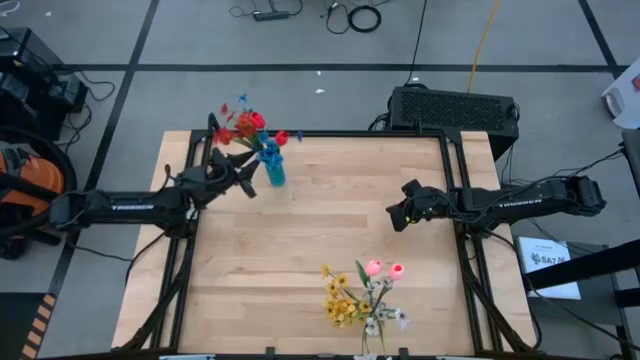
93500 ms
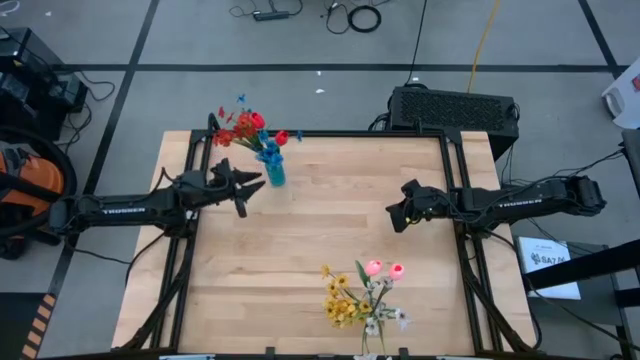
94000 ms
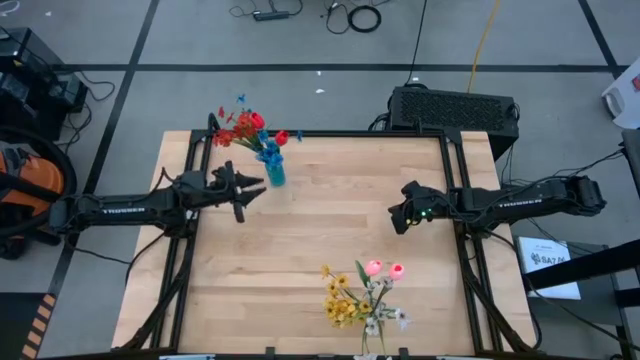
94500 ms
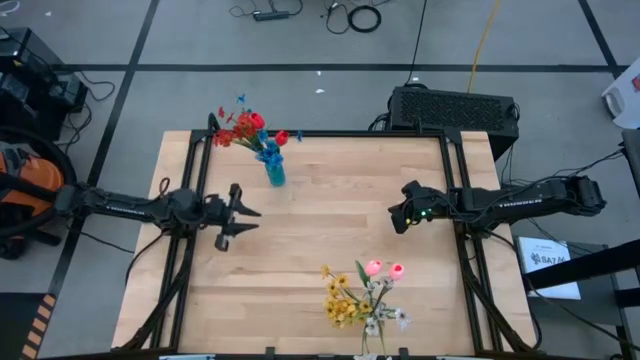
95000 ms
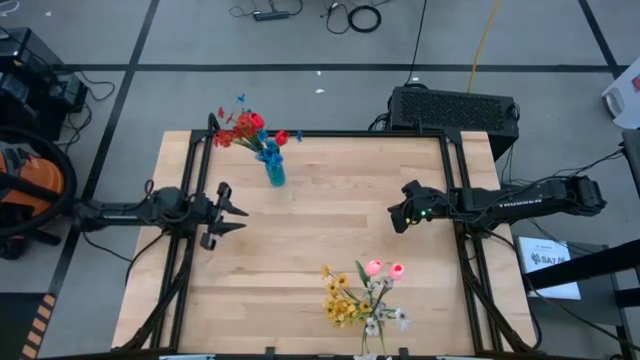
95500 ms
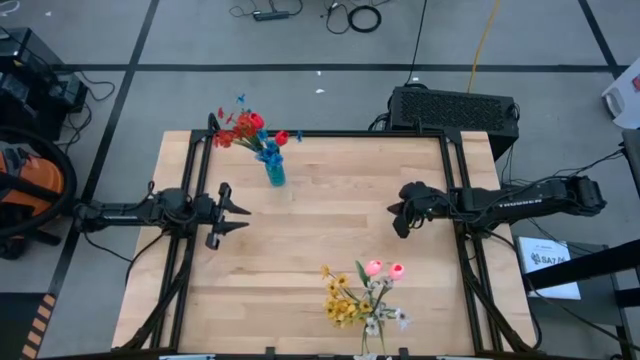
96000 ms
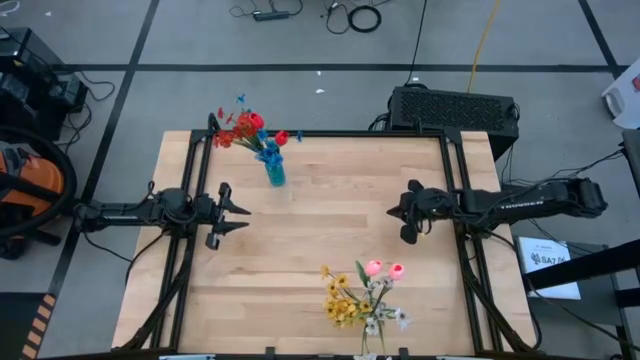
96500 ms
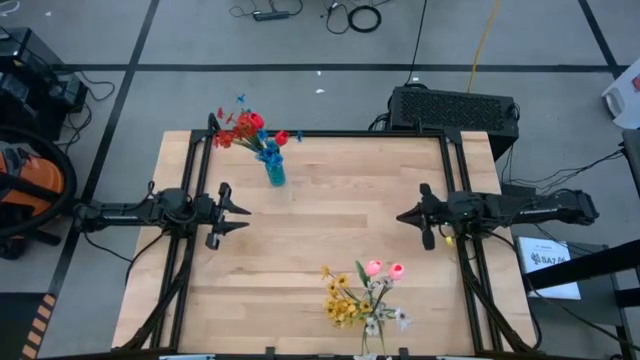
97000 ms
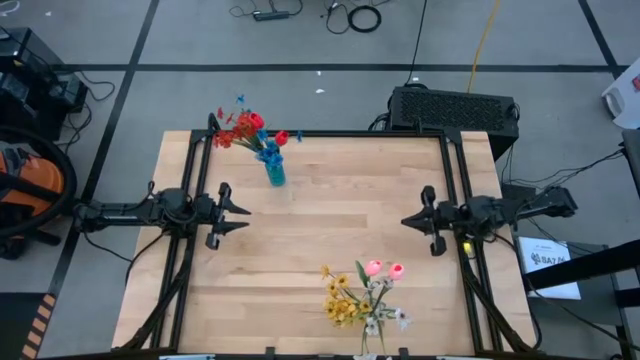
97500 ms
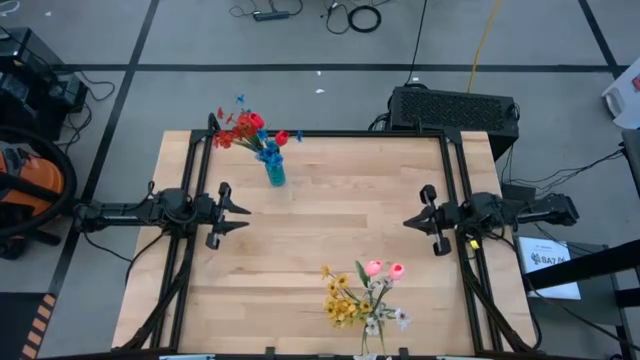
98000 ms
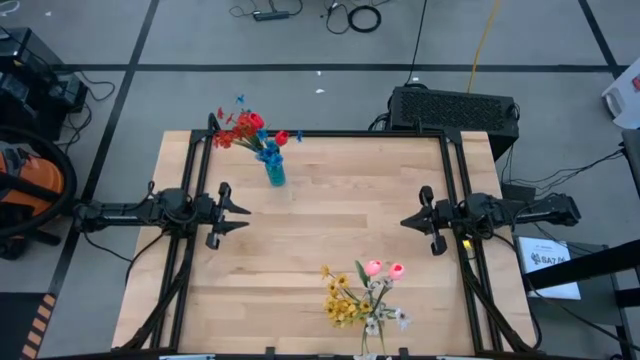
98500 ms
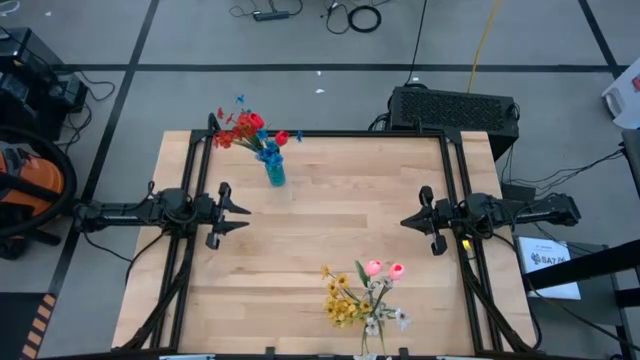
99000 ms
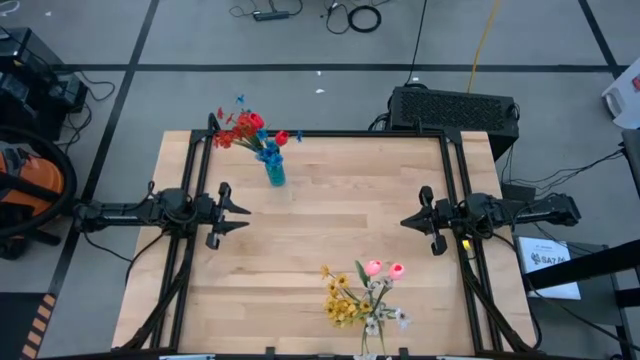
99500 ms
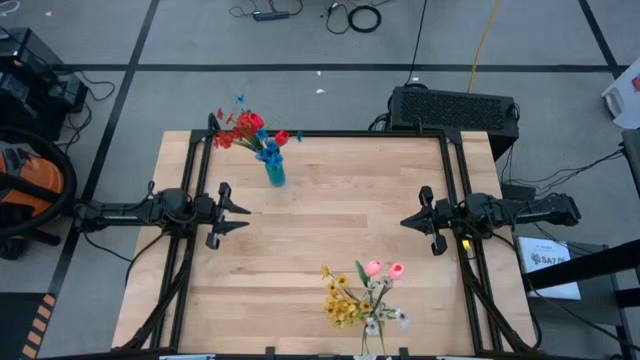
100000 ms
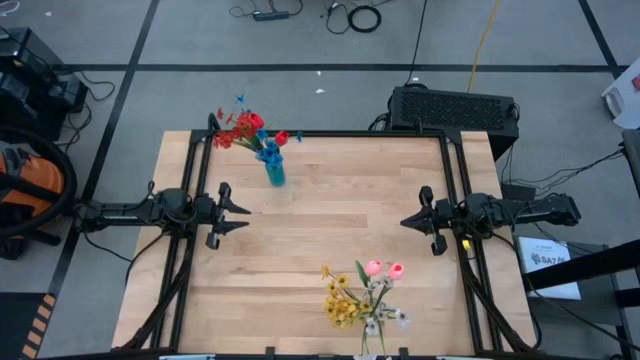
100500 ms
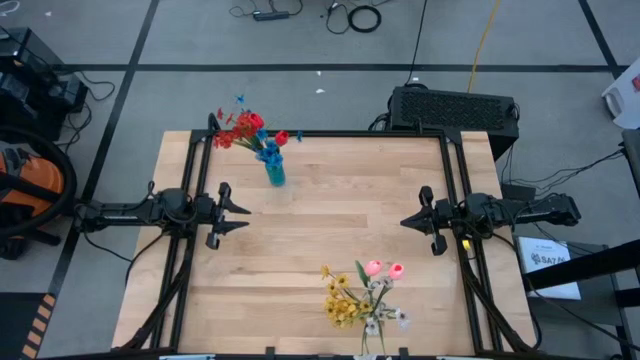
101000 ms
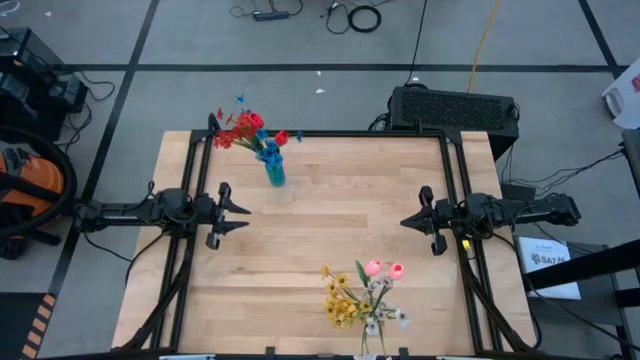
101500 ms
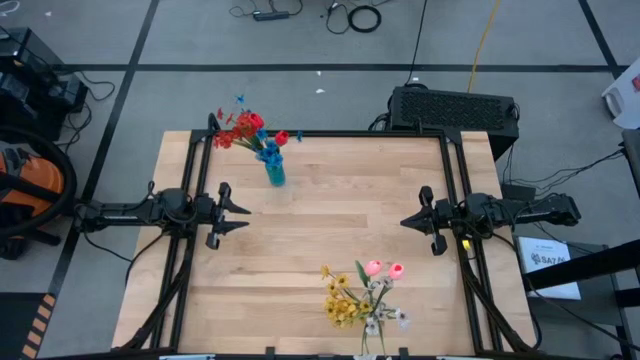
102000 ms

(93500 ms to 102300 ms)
Task: Sort flowers into vase by color
Return to Home Position

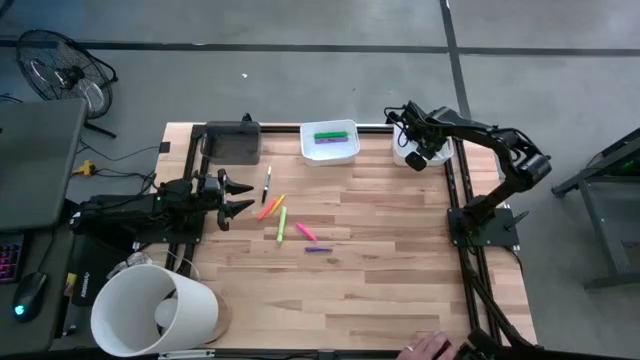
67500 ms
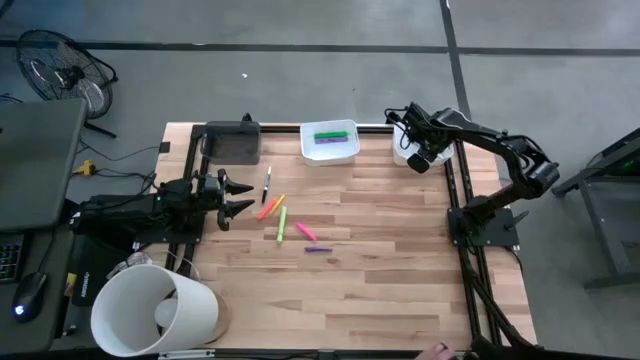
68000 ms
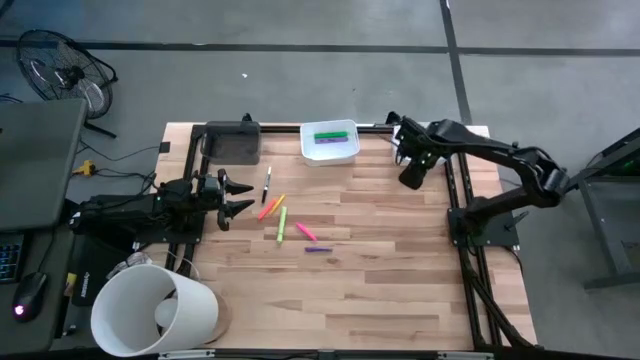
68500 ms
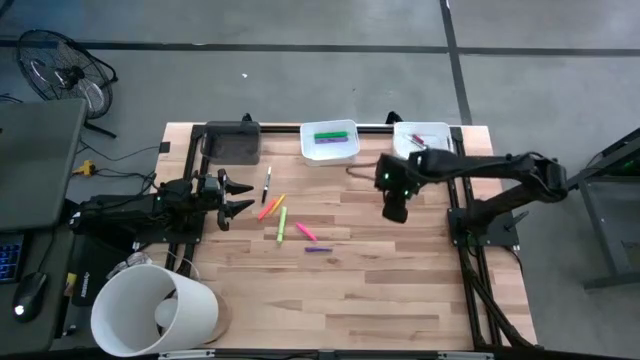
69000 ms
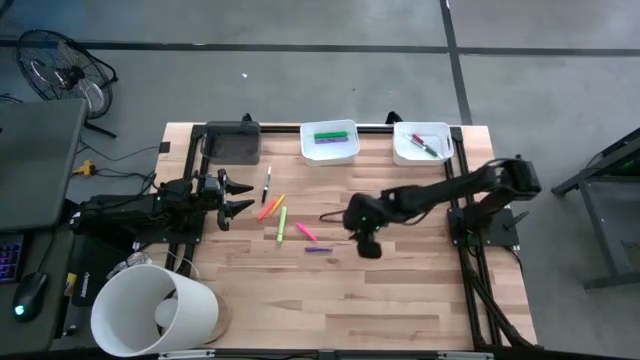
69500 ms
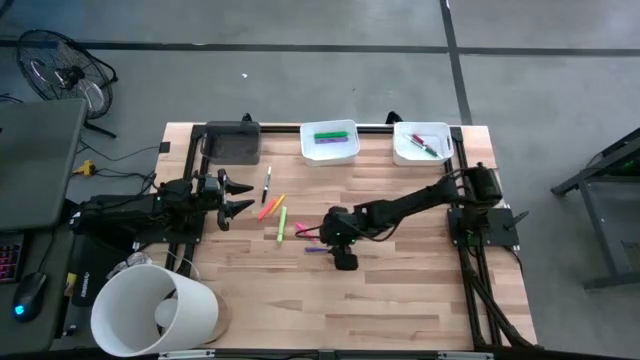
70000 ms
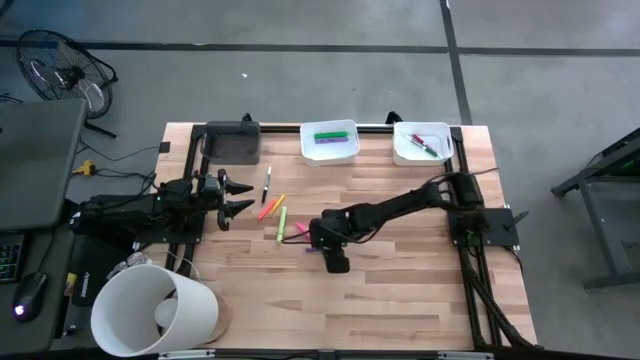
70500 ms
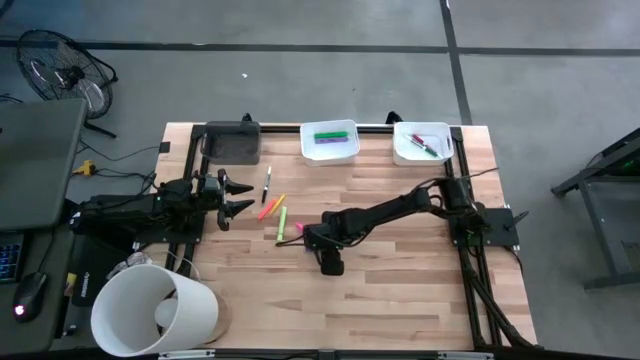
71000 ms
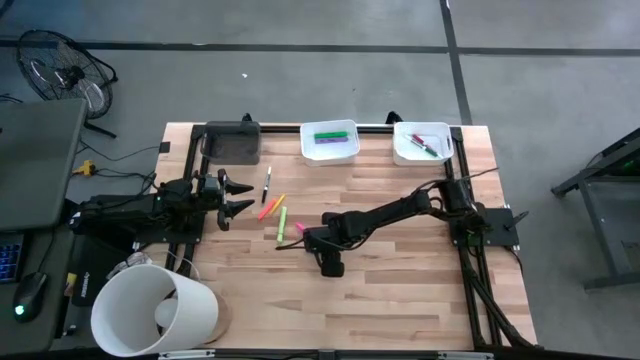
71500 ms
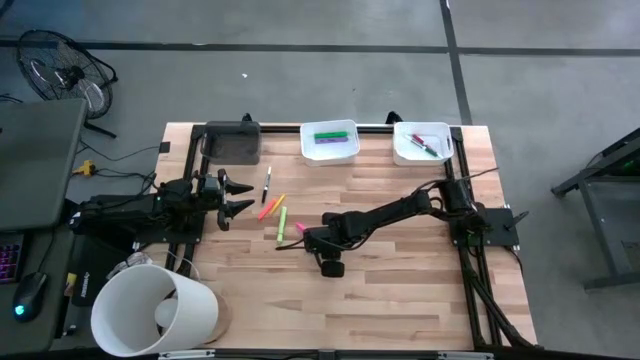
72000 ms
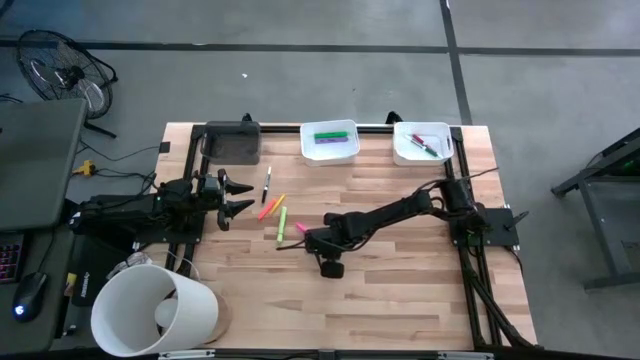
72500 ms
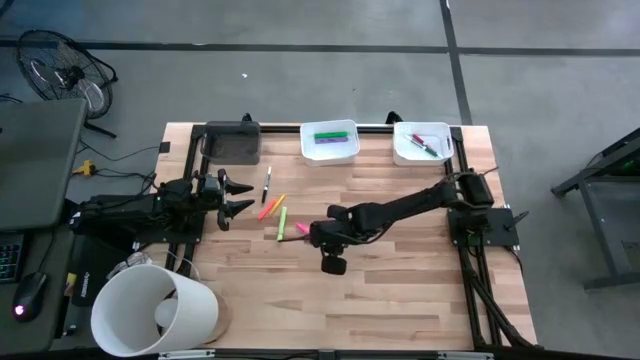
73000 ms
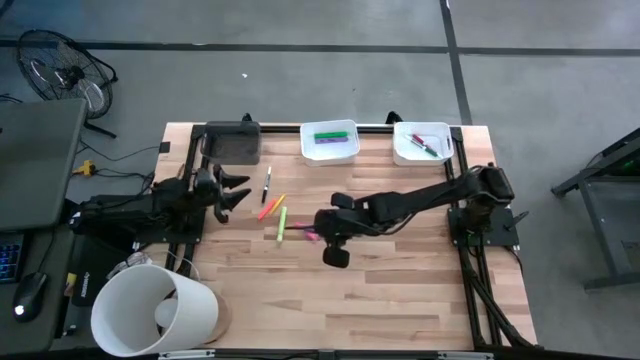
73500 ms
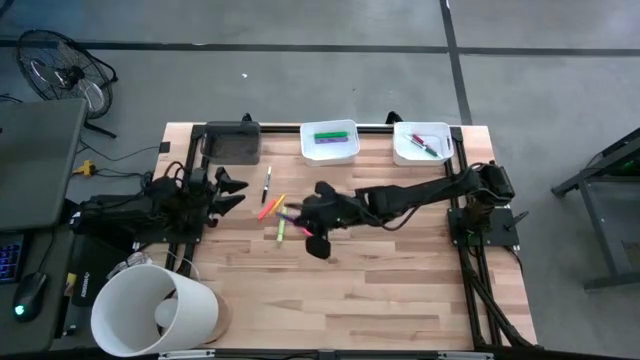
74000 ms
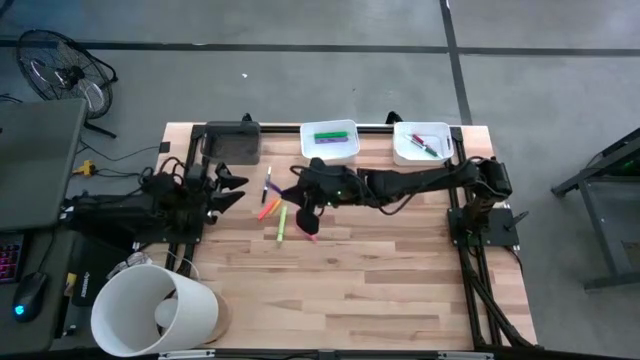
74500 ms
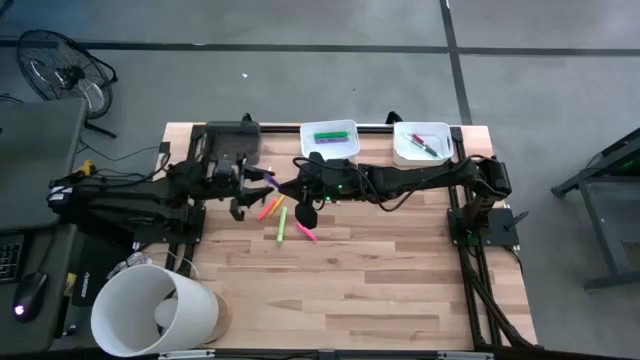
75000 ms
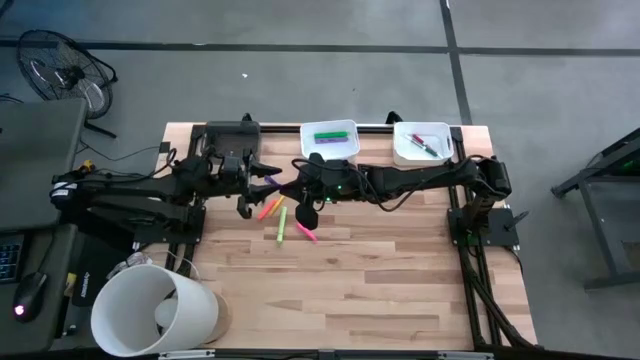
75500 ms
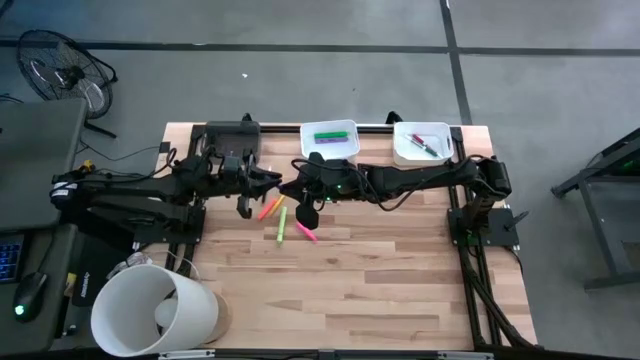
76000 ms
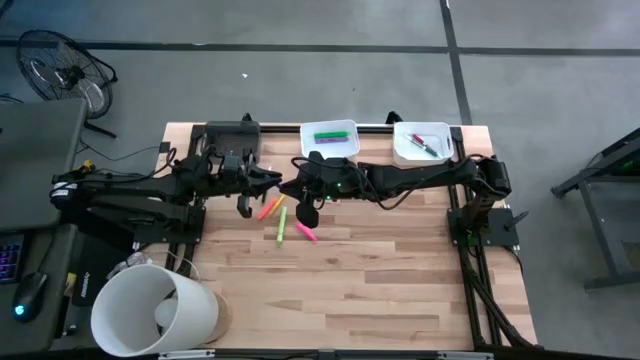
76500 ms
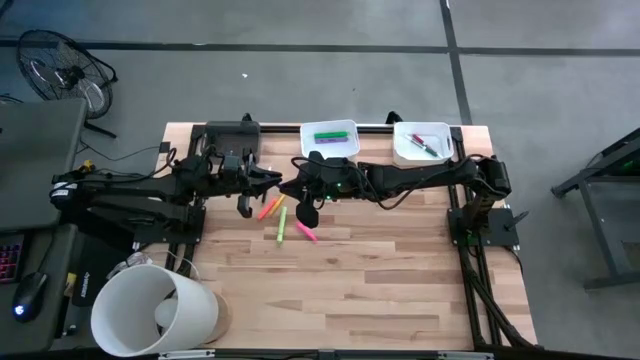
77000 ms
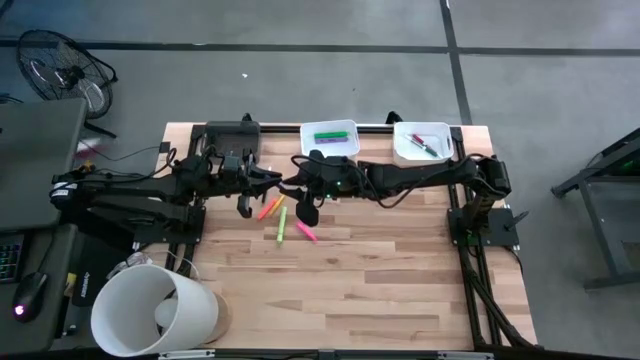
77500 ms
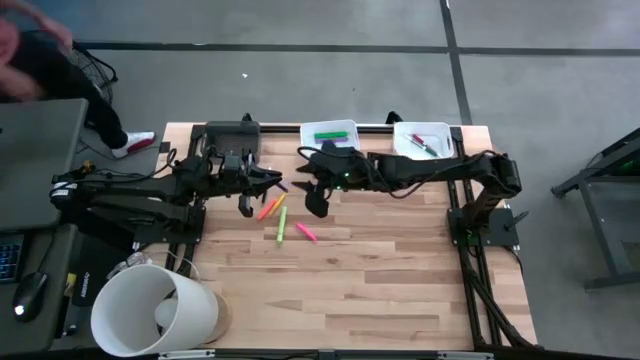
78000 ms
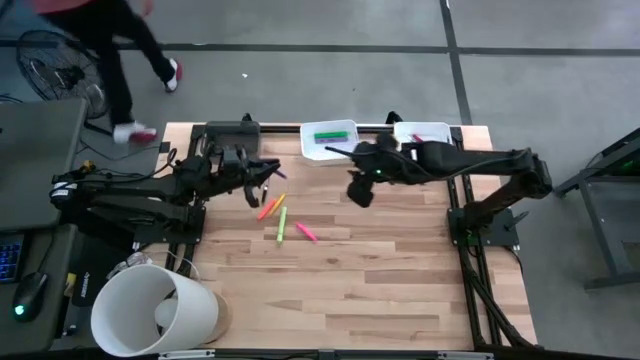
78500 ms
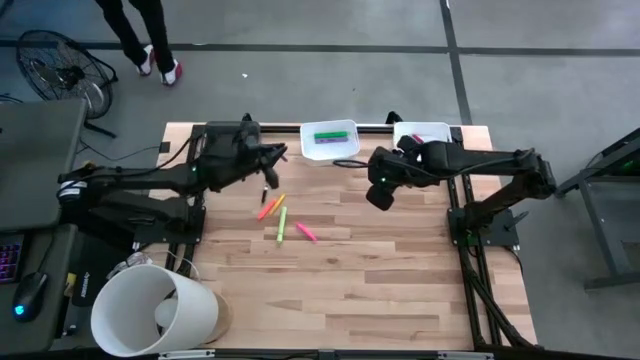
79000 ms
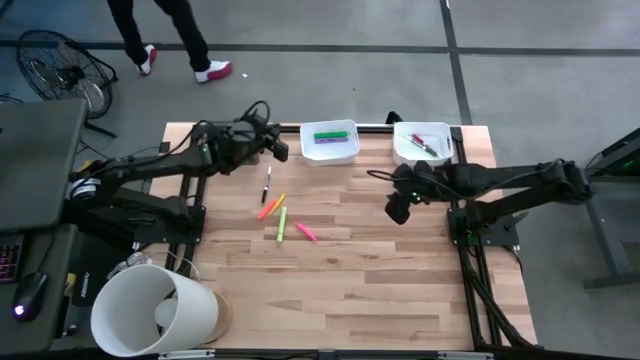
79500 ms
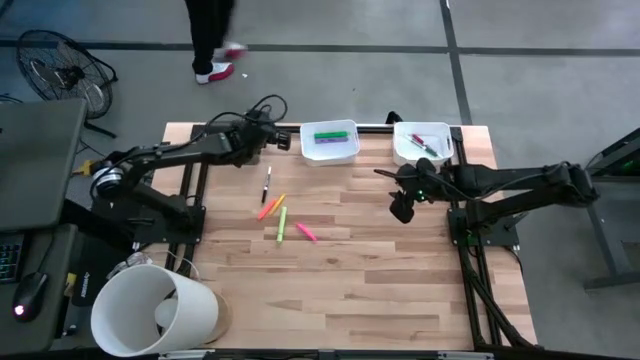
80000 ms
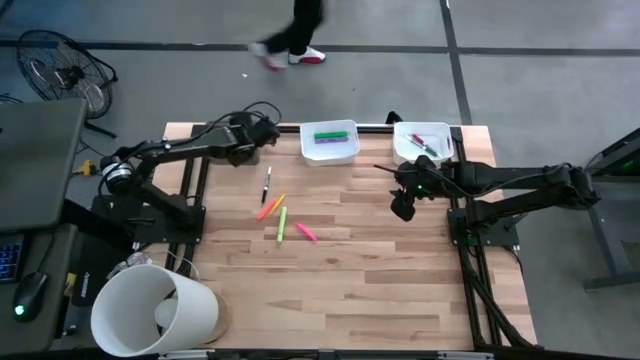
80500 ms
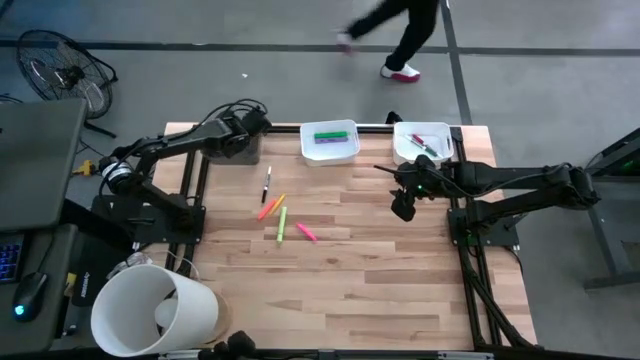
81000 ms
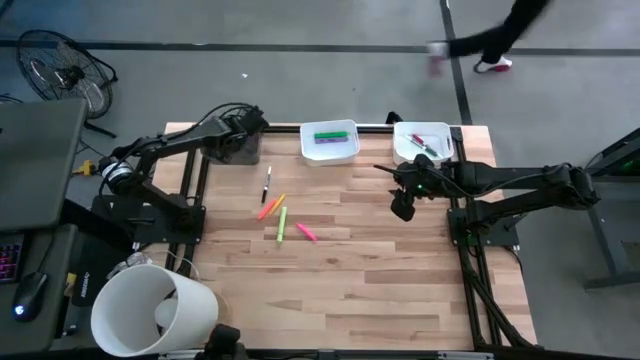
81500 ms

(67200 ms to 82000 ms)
Task: Pick & Place Markers
Put the violet pen into the black bin

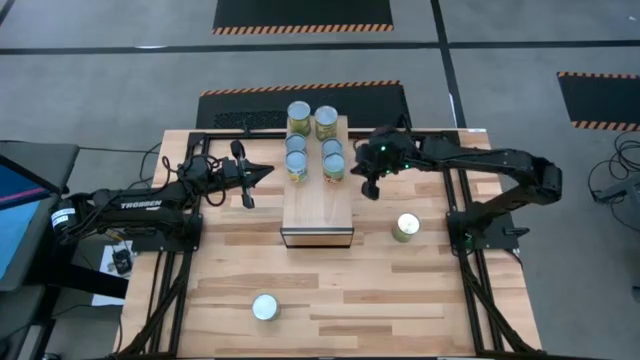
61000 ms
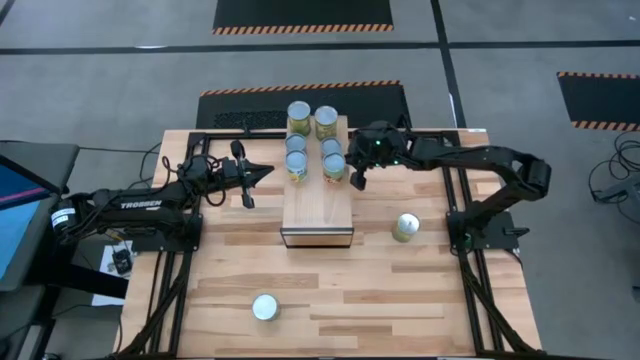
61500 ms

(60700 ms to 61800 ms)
Task: Pick and place cans onto a shelf
Adjust the small canned oranges on the shelf
